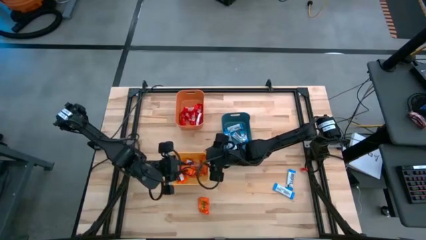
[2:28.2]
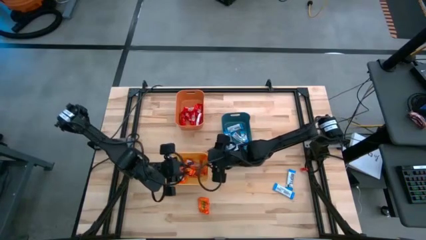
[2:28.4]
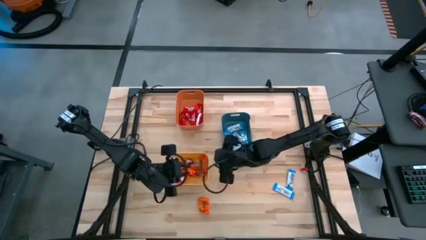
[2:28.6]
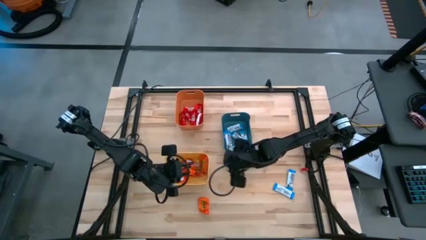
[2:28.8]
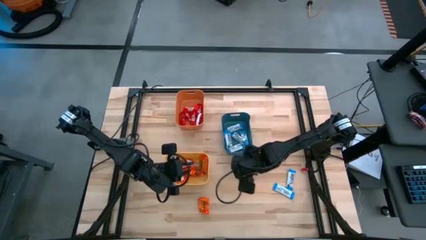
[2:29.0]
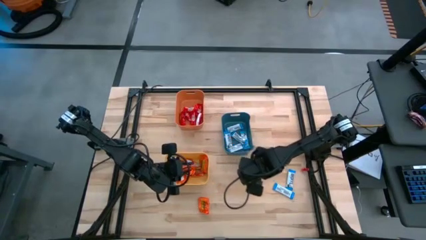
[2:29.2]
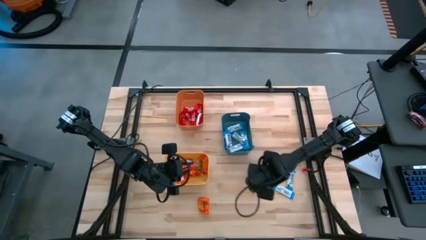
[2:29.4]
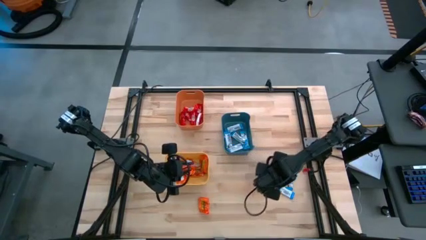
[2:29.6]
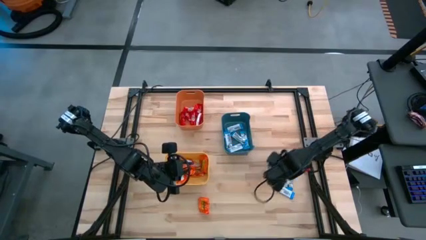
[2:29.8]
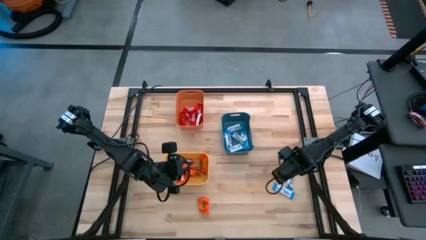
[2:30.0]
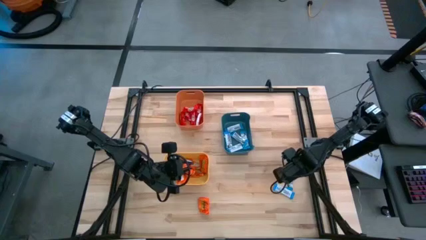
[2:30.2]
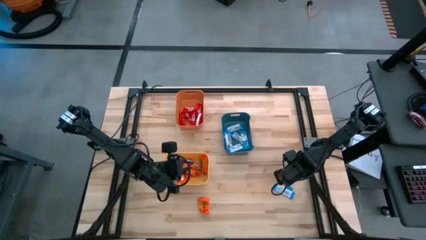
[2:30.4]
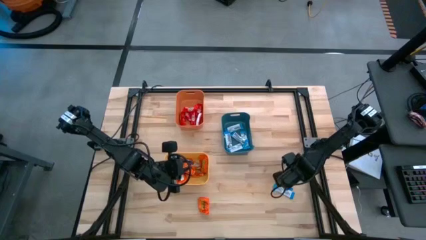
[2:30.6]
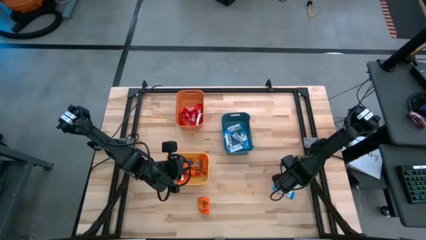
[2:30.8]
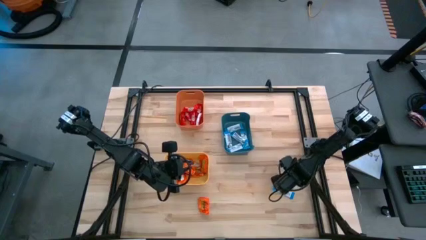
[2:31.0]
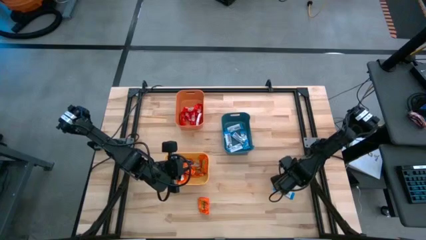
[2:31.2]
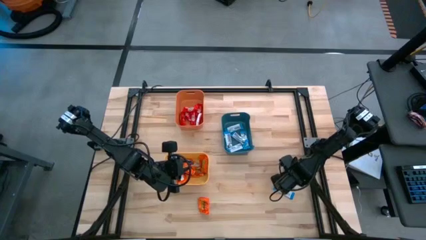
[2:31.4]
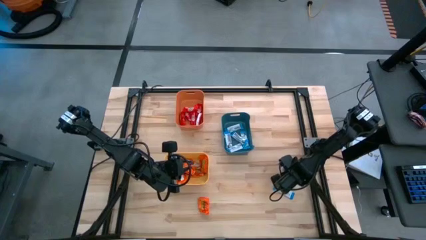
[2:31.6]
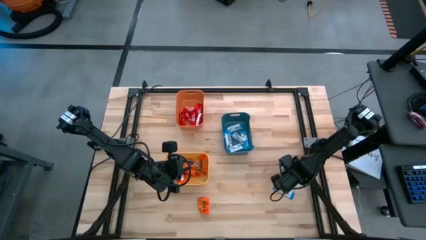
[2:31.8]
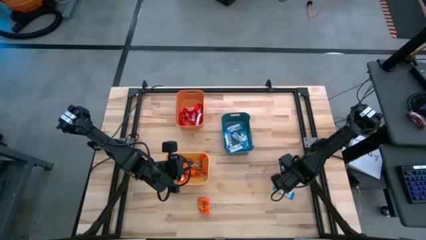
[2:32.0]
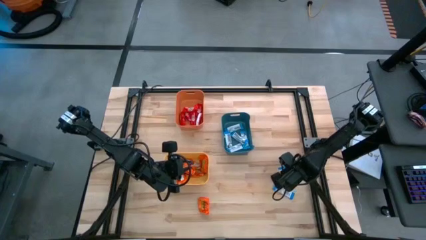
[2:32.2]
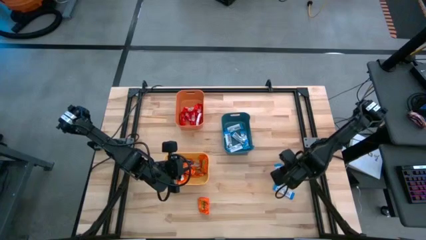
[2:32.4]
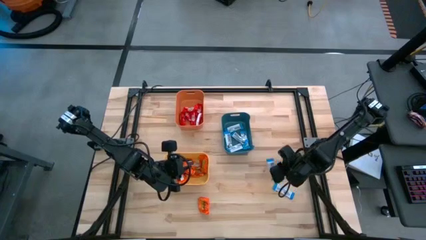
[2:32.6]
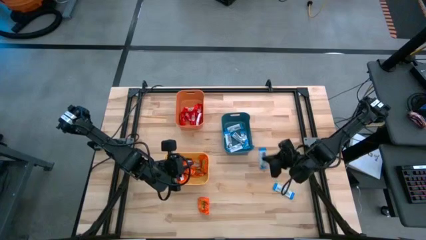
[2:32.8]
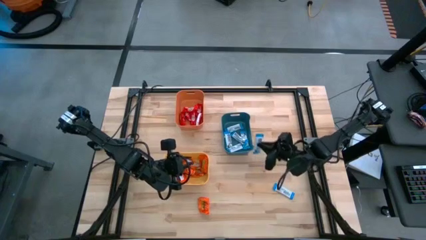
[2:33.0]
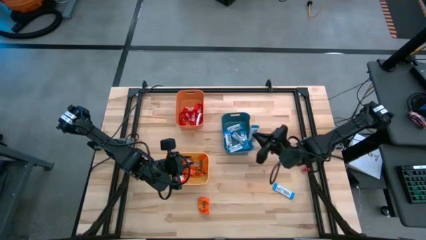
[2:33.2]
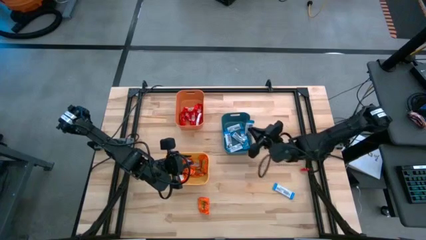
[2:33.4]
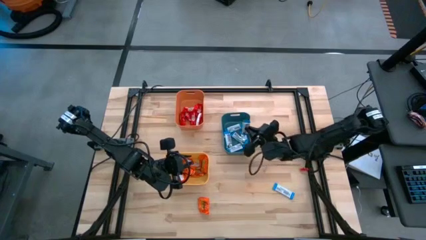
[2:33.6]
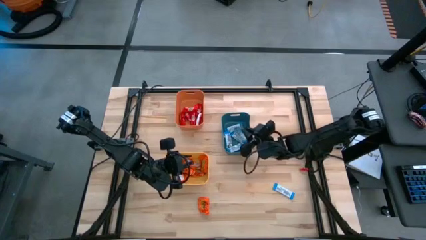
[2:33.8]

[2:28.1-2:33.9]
Task: Organize candy in baskets
Put the white chocolate into the blue bin

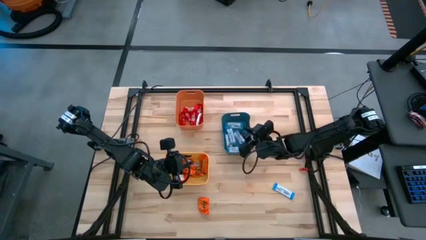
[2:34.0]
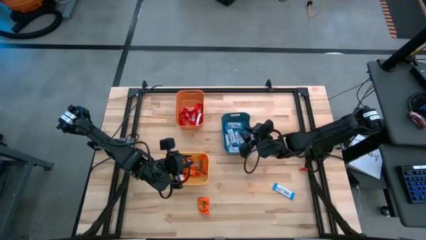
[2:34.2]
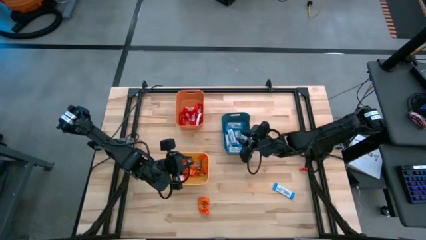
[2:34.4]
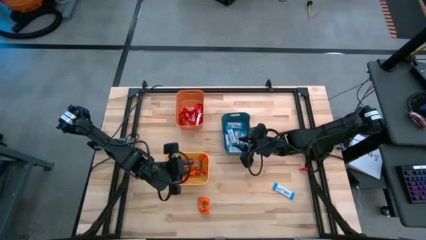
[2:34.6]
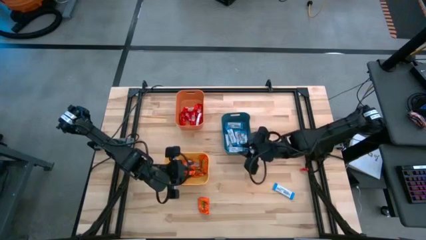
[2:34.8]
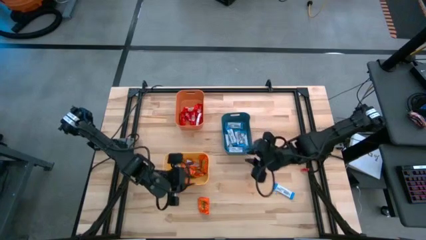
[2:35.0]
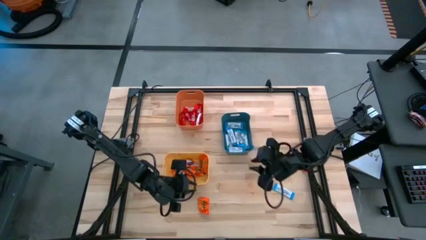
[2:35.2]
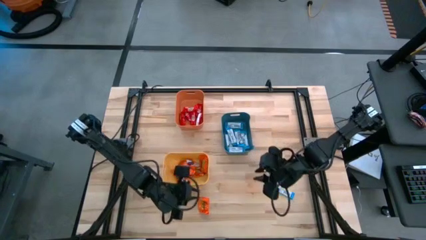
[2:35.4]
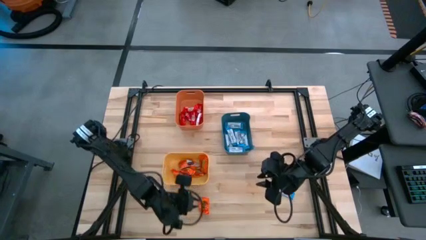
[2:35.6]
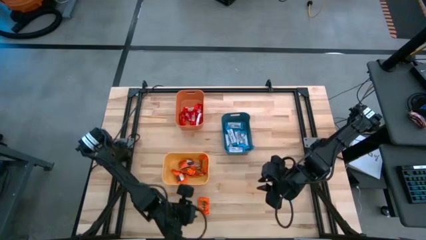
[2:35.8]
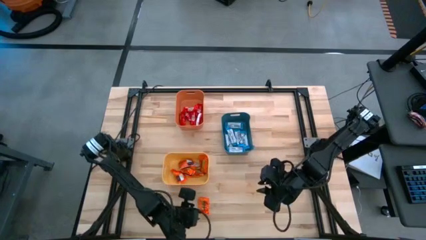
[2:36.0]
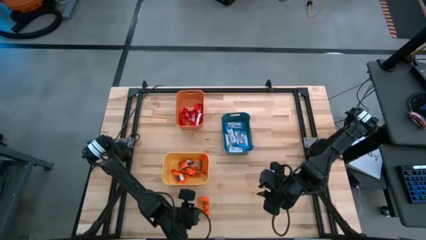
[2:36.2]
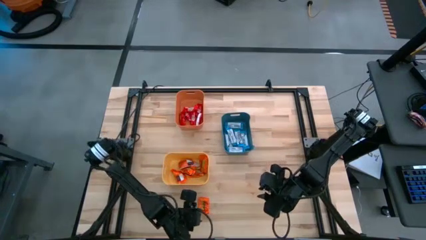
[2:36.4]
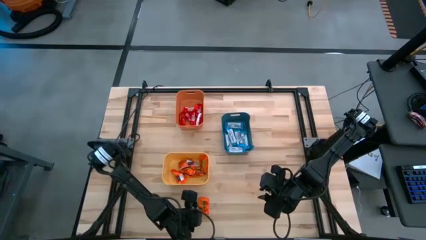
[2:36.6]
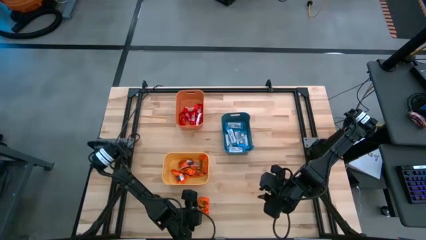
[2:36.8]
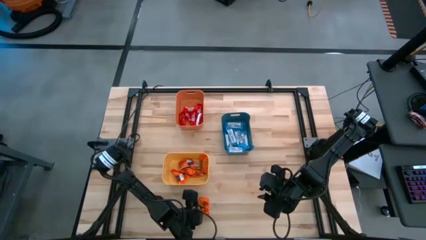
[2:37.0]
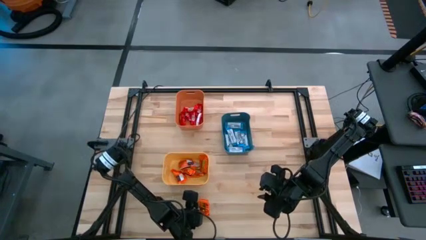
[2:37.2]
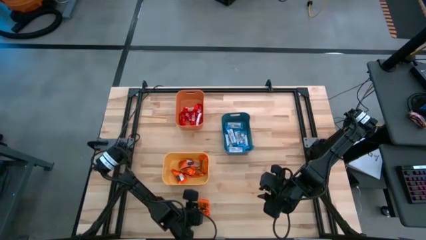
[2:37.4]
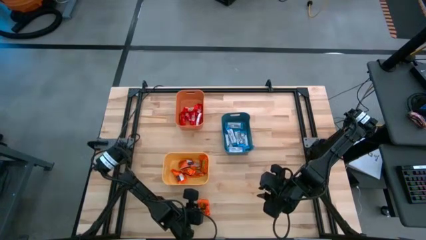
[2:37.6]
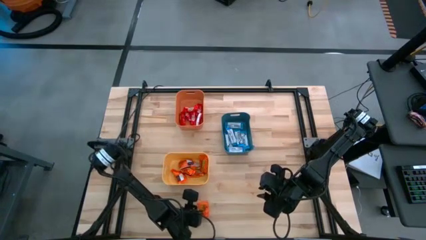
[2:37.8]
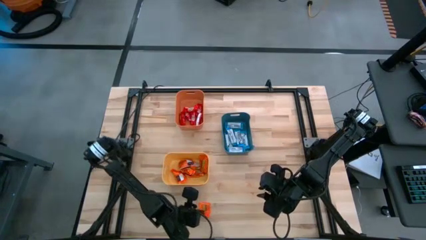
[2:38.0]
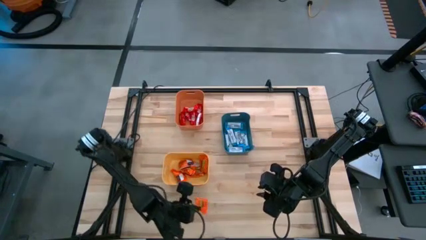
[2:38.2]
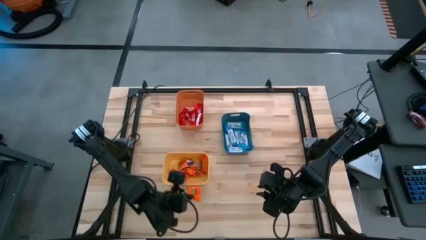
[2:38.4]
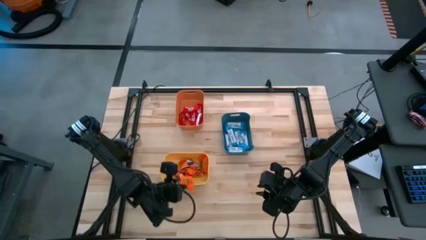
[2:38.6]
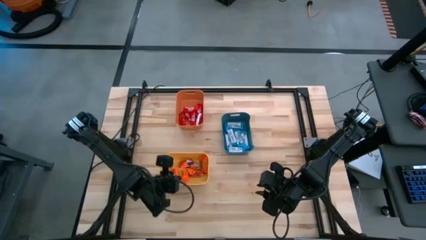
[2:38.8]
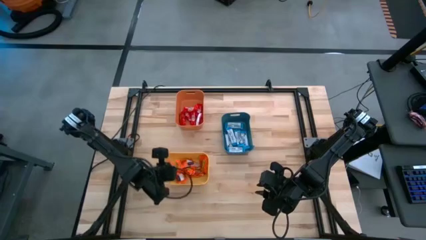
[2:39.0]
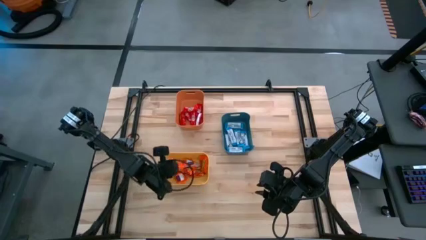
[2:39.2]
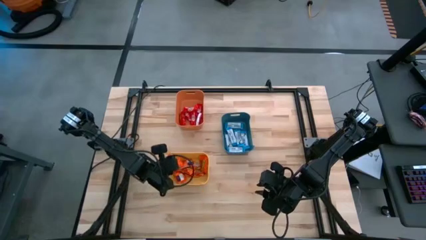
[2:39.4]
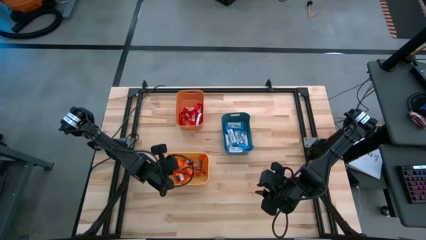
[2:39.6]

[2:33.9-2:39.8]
Put the orange chocolate into the yellow bin

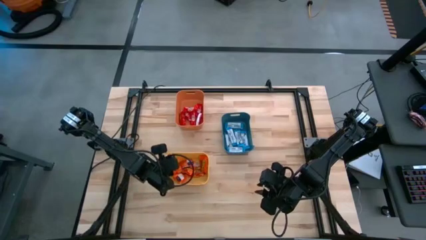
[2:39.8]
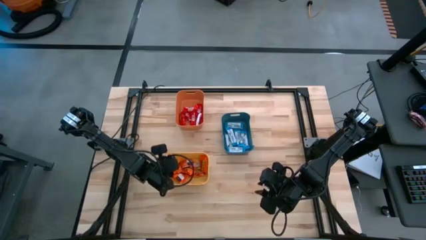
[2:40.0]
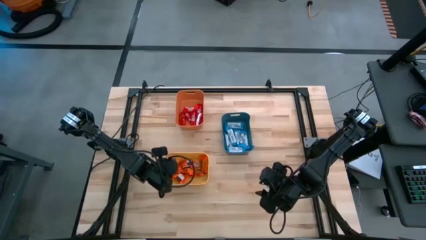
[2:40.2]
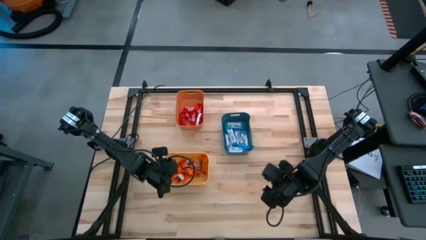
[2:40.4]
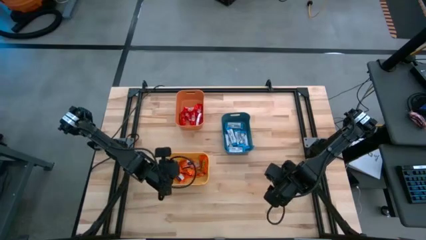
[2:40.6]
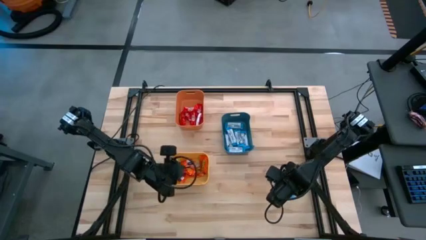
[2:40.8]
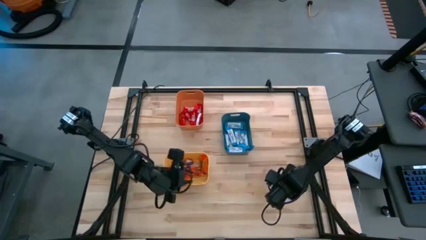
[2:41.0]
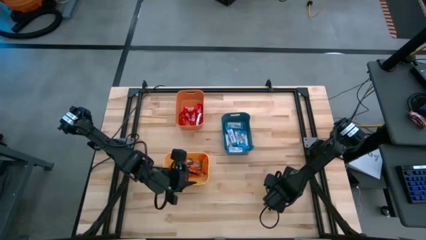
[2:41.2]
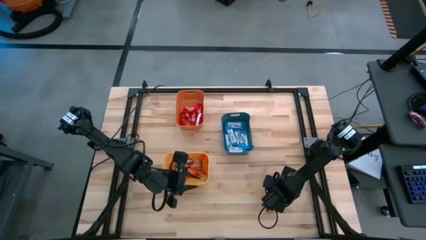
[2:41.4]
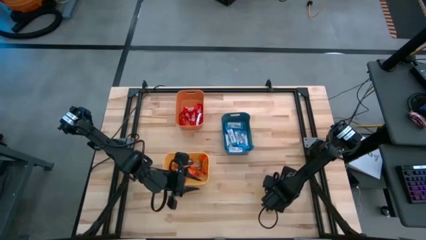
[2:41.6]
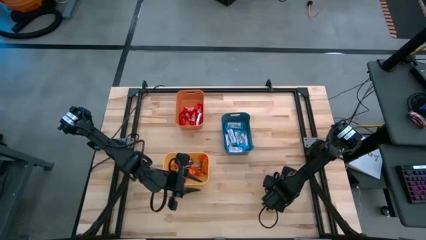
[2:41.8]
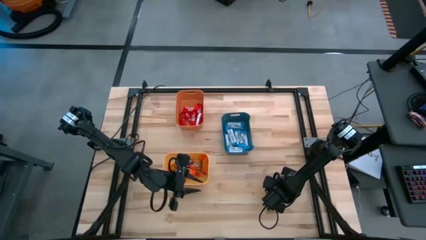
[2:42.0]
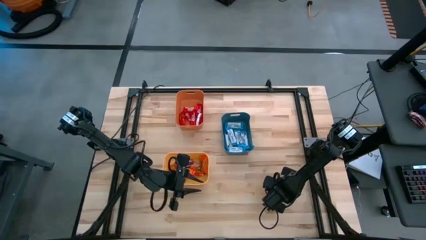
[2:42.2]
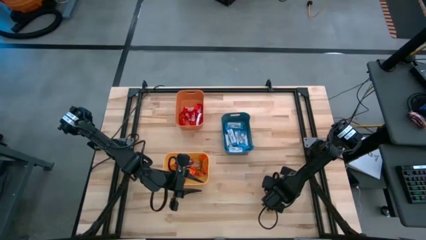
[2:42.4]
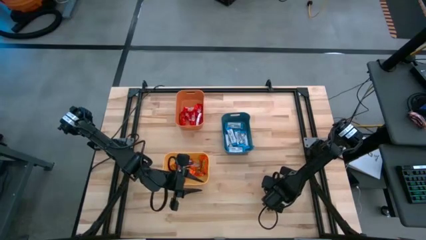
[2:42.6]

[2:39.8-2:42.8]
Put the white chocolate into the blue bin
